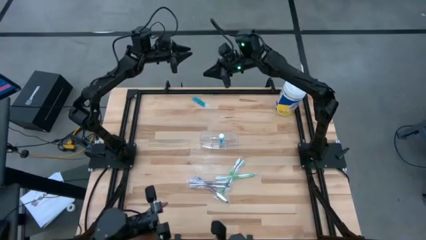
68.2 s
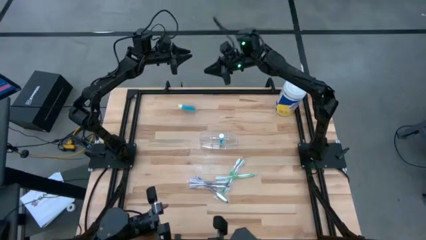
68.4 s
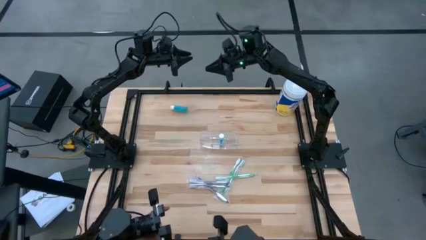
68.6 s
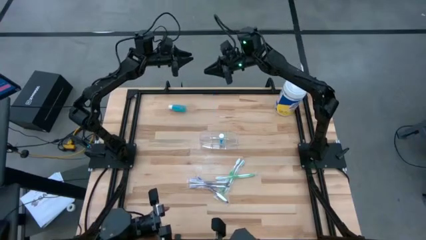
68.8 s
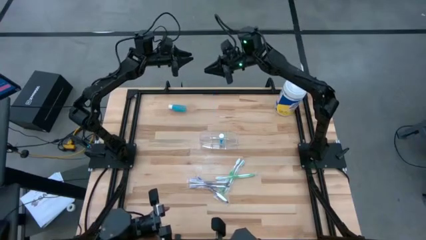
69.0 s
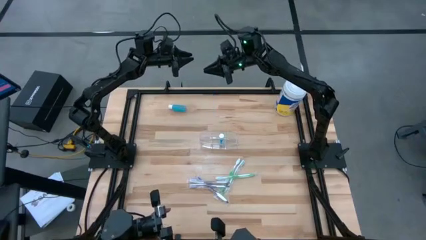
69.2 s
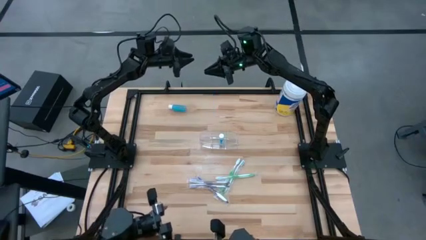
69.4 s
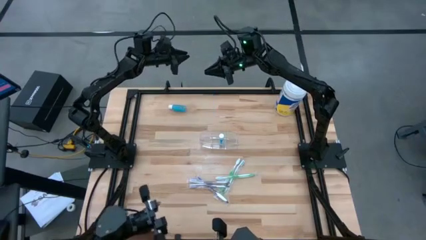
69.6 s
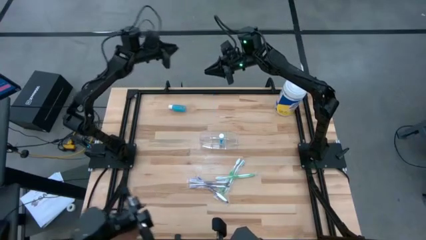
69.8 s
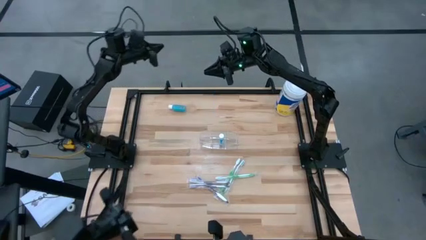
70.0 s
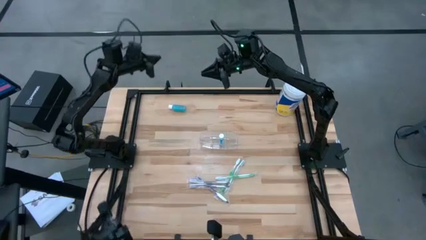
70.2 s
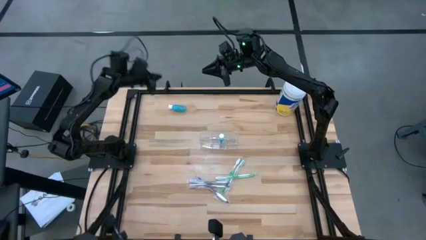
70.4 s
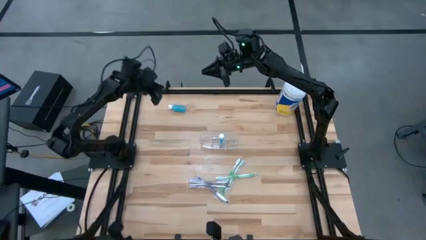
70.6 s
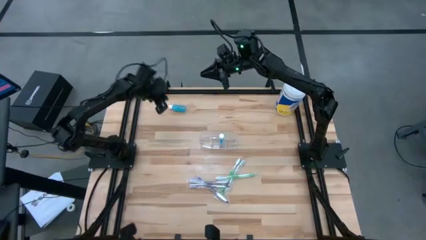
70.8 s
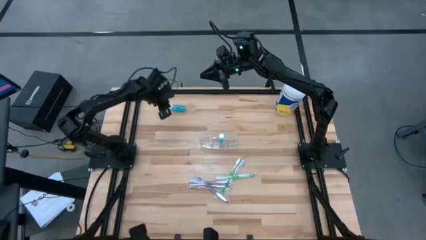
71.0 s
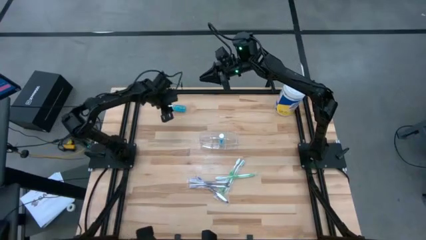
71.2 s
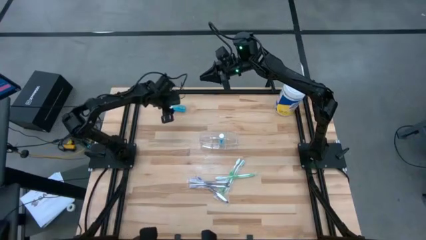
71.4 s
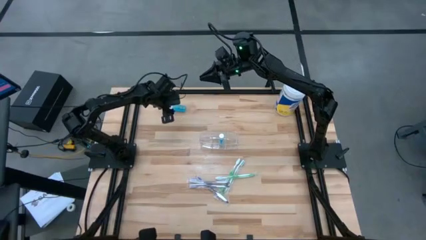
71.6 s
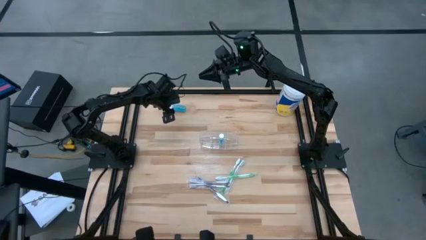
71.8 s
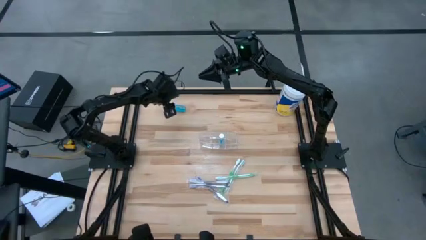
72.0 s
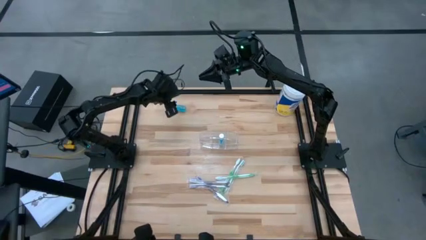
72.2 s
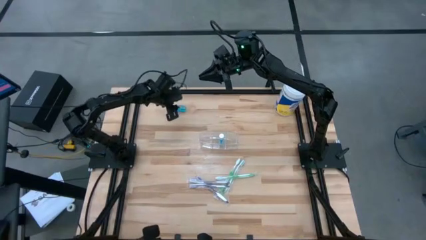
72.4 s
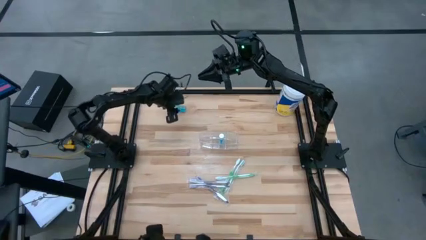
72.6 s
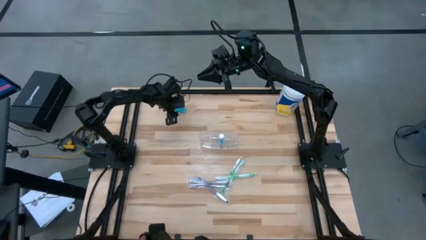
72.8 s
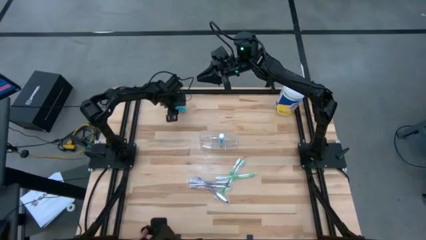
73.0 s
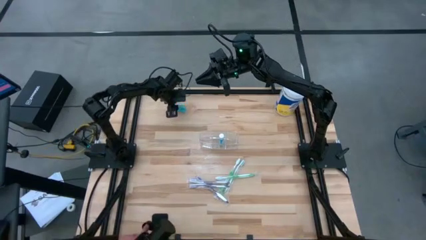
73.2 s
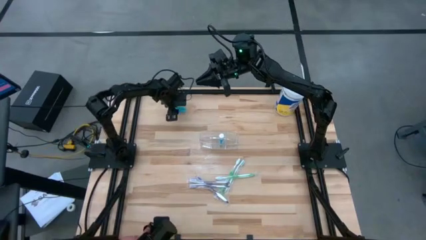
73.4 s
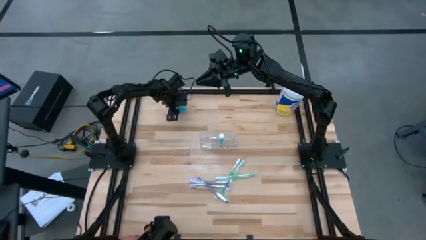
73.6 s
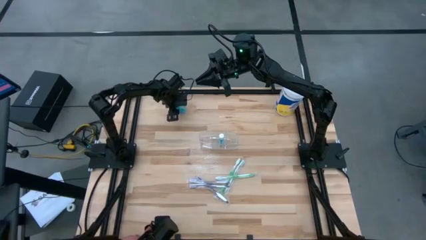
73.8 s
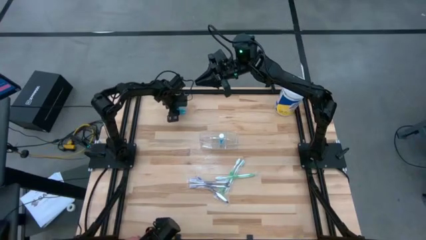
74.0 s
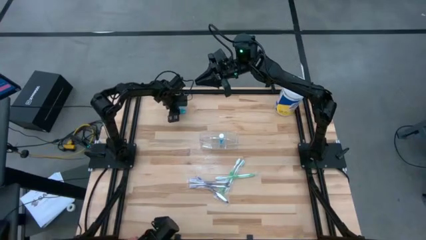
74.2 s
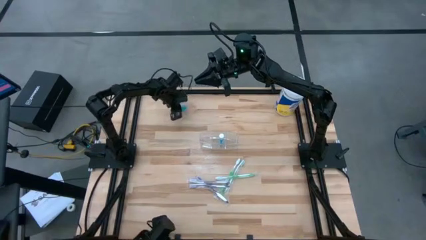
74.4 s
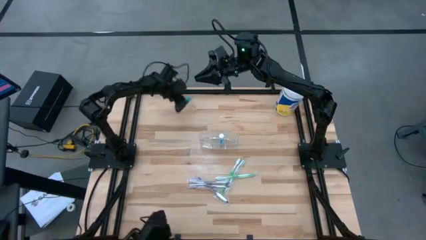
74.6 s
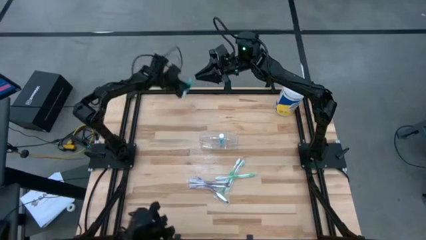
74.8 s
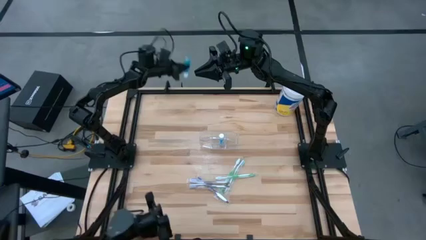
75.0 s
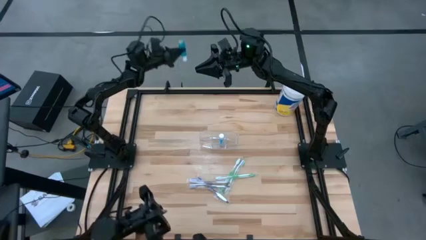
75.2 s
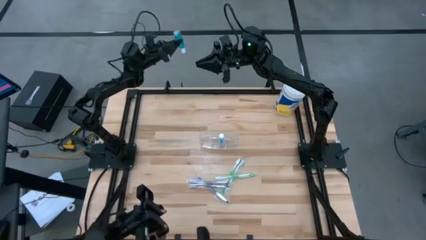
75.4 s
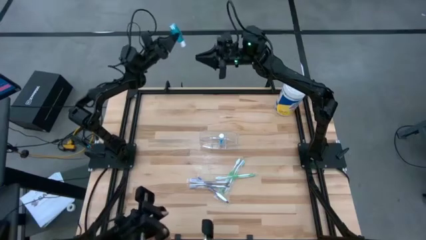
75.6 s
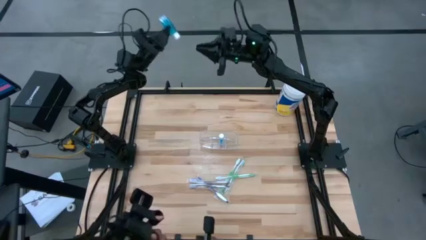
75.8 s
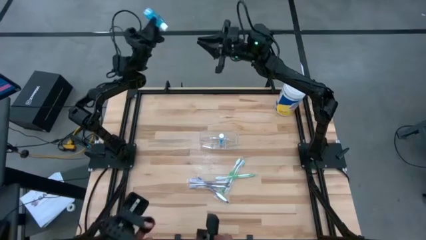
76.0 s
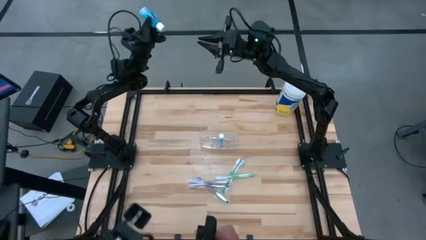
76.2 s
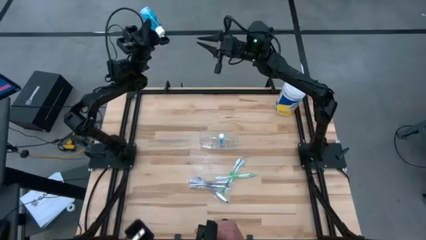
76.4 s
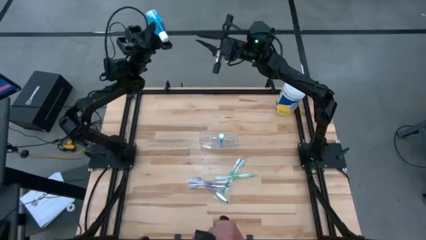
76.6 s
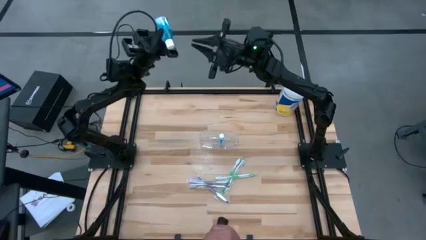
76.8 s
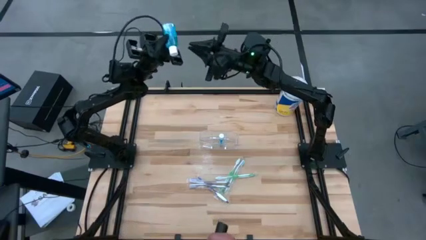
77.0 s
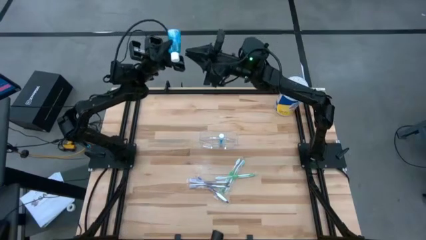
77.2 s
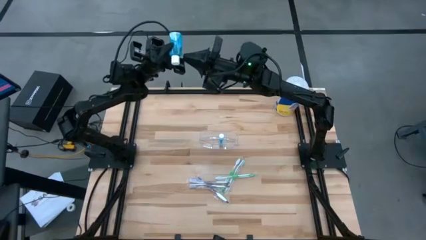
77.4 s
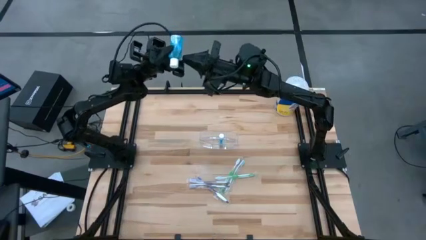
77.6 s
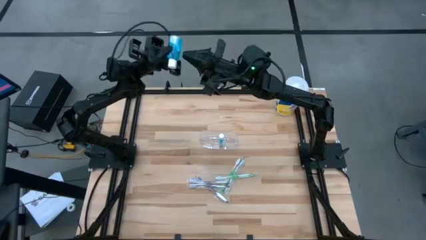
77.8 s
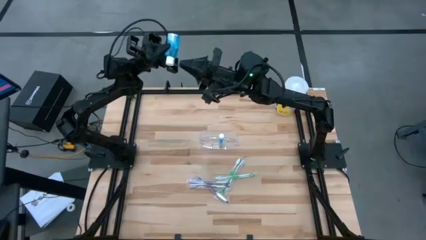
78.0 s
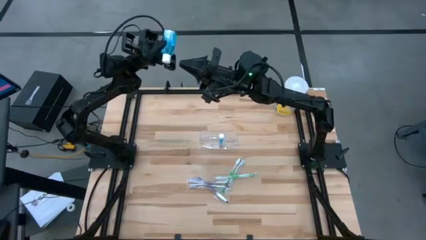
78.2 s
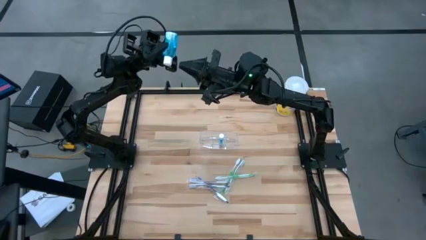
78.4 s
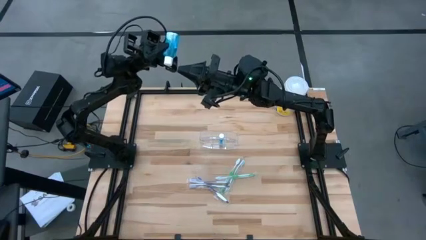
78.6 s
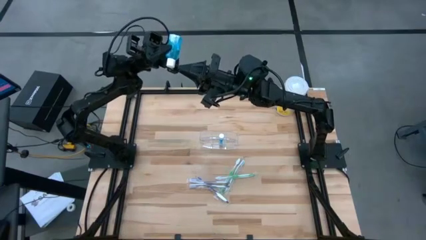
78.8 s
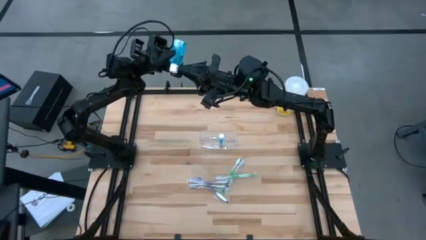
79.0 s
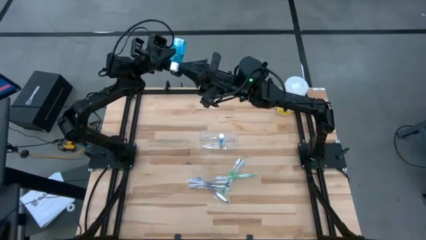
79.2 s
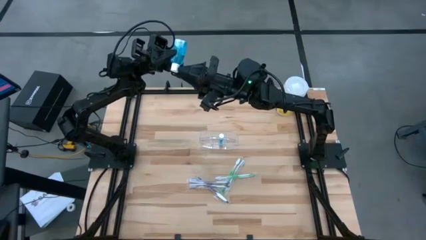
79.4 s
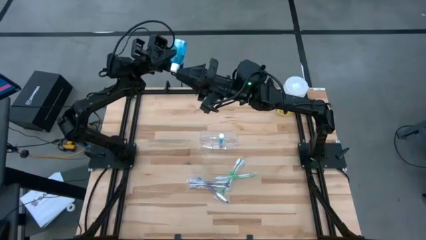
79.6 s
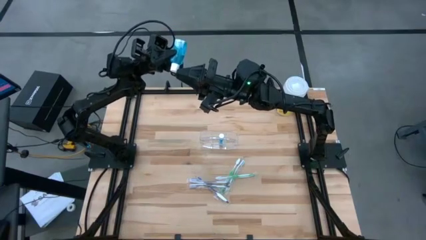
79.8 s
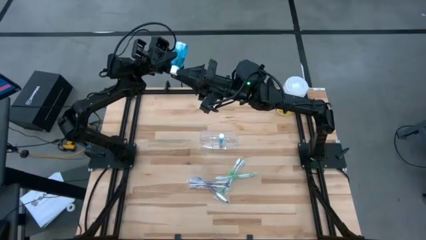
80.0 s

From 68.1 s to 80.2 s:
Task: Pick & Place toothbrushing station
Put the blue mouthwash bottle into the transparent organizer
